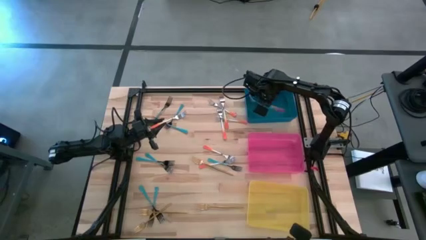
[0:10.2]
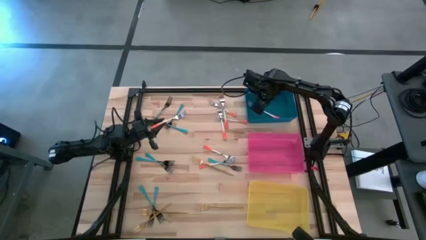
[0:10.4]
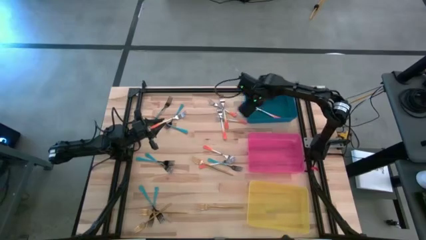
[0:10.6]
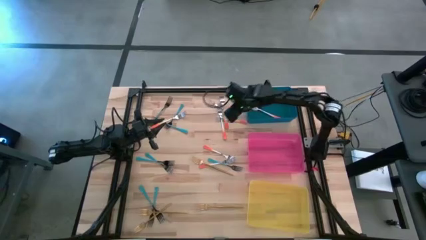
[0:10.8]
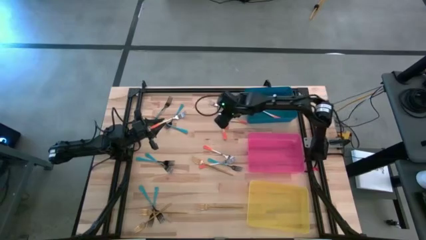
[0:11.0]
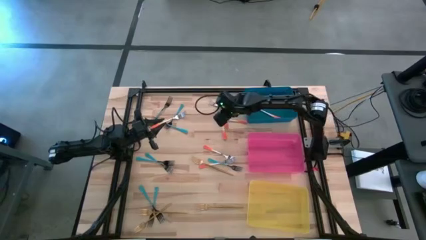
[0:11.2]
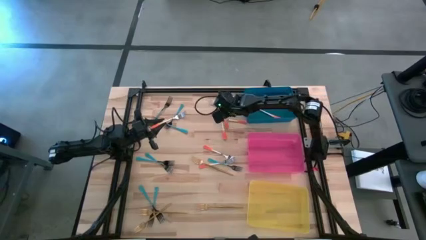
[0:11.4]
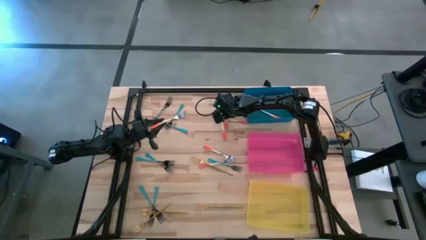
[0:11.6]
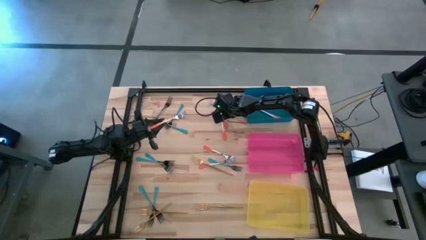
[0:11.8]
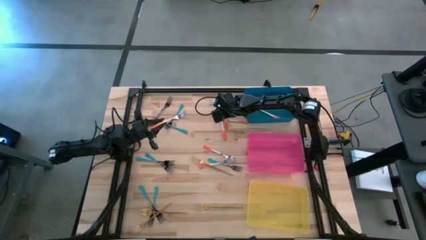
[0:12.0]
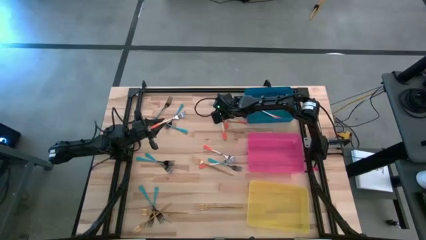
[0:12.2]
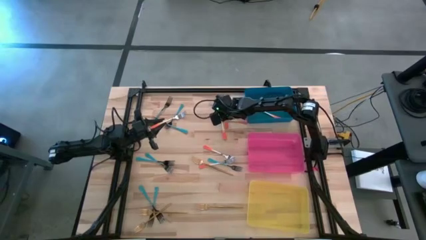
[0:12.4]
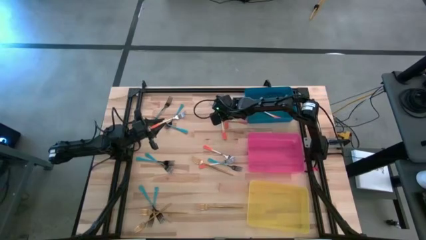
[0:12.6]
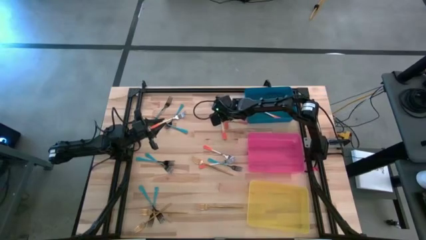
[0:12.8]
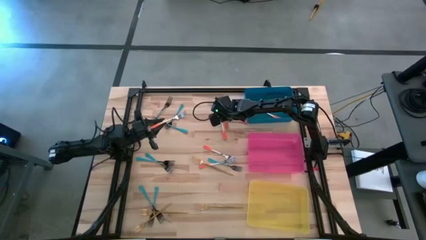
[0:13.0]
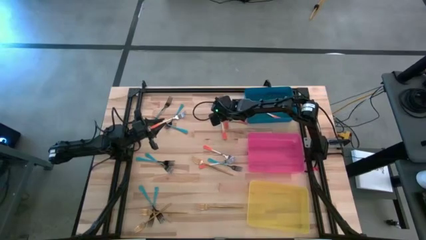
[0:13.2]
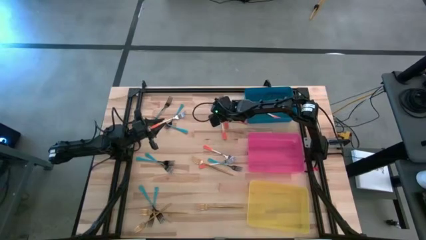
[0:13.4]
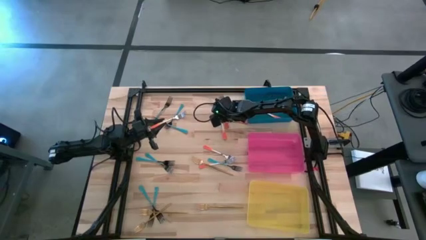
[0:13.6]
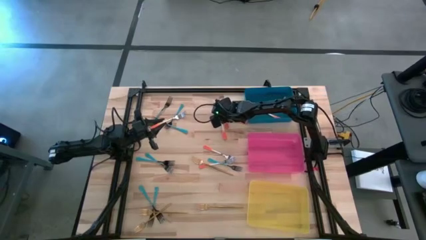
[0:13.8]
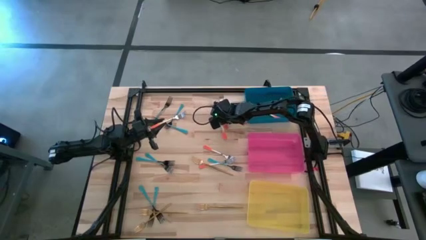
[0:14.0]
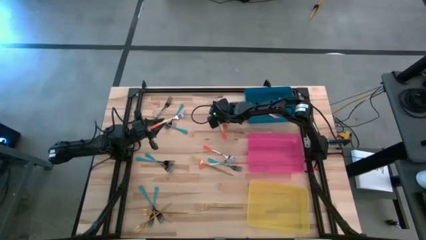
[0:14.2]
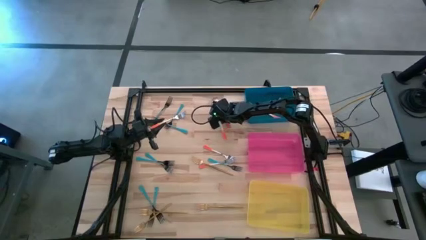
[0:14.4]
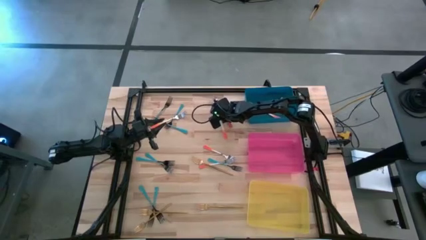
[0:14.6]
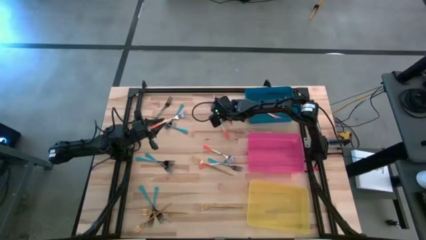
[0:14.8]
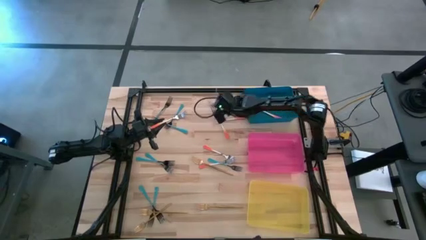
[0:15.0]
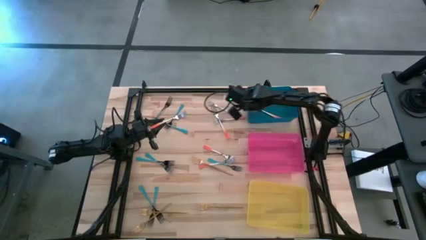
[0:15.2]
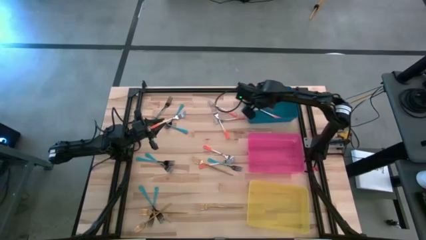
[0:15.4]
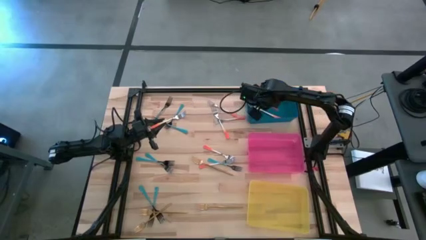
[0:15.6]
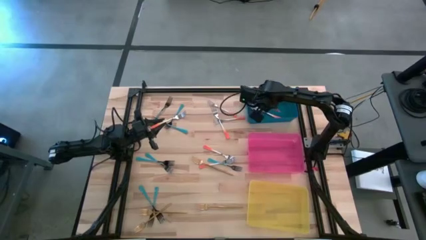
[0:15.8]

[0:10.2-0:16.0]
Task: Sort silverware by color (type)
Put the orange fork into the blue bin

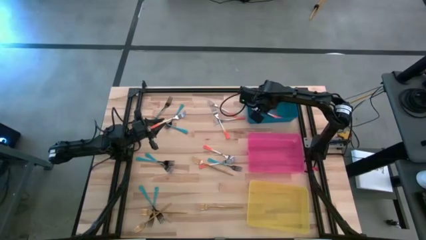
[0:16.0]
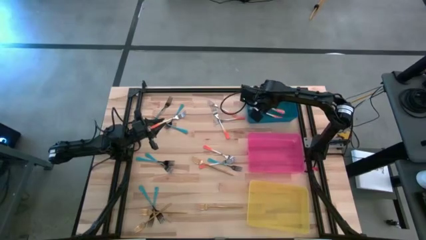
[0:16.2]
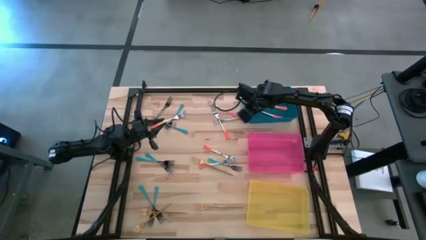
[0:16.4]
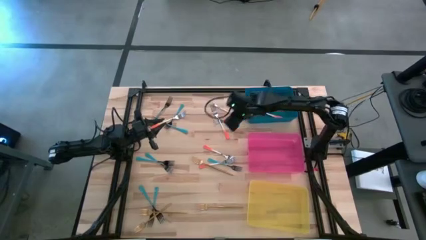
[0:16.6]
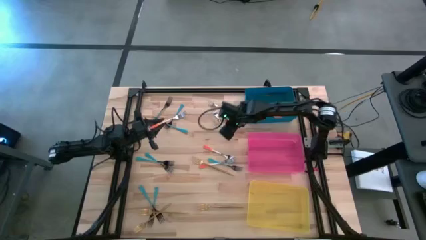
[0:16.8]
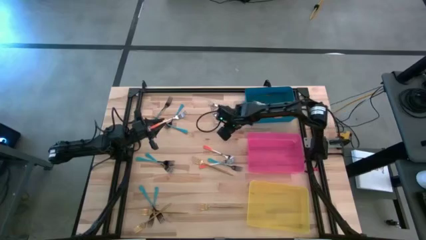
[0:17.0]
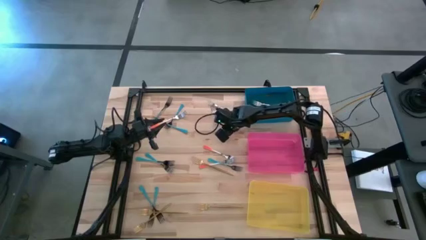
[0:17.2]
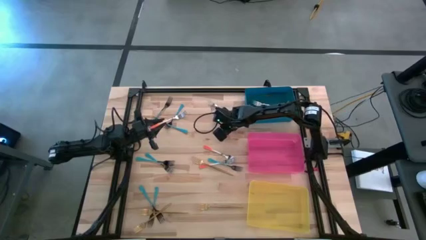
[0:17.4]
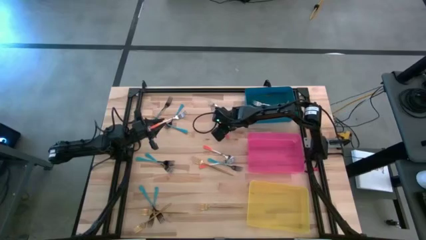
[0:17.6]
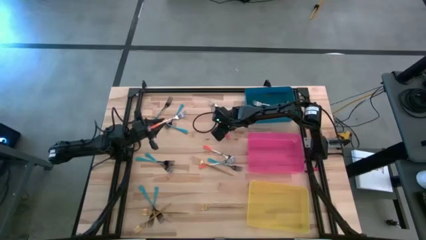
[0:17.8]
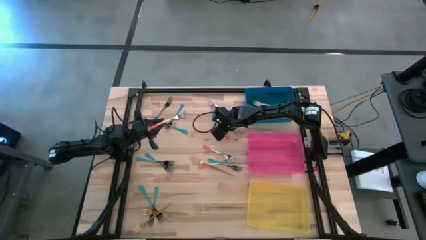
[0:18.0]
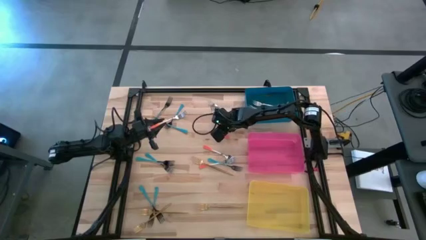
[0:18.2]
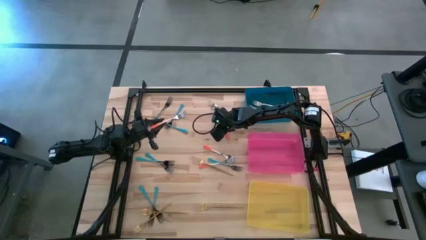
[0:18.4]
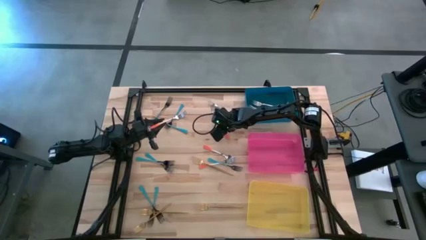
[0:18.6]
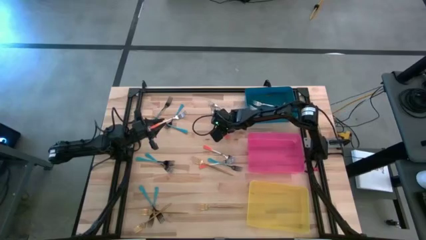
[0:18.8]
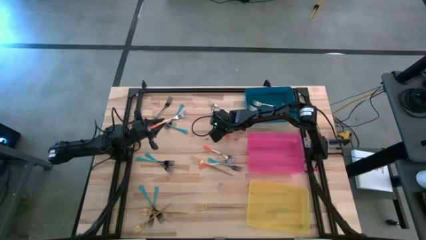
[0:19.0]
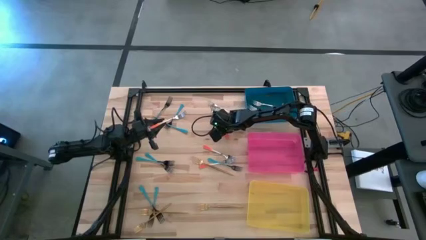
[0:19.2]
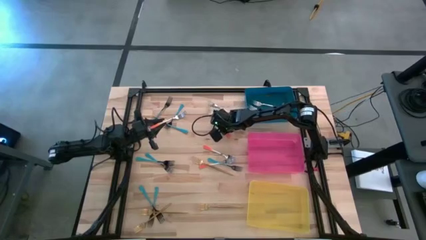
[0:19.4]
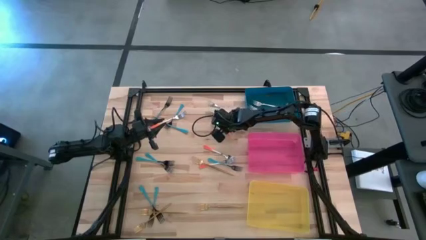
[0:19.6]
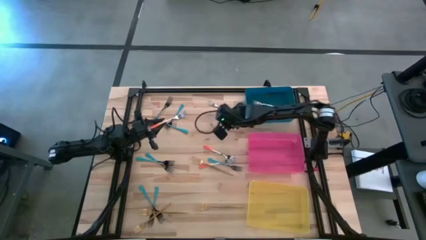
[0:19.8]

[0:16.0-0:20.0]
Put the orange fork into the blue bin

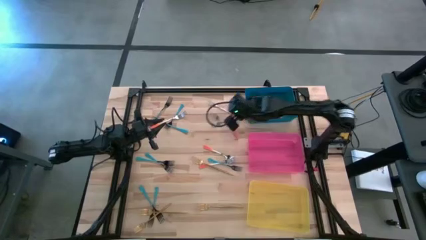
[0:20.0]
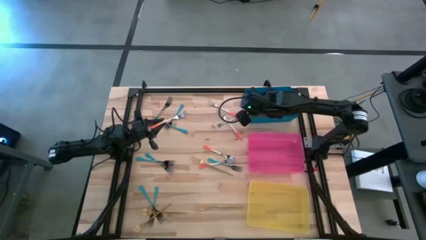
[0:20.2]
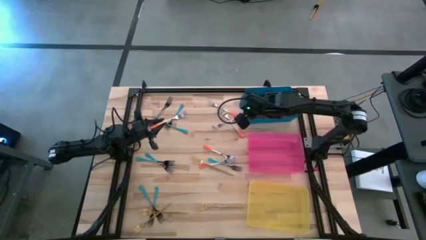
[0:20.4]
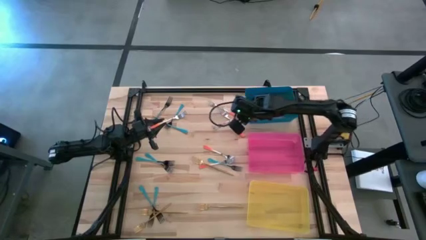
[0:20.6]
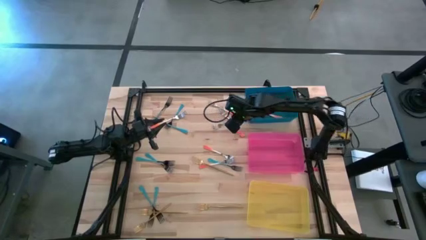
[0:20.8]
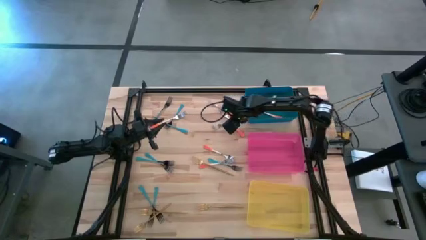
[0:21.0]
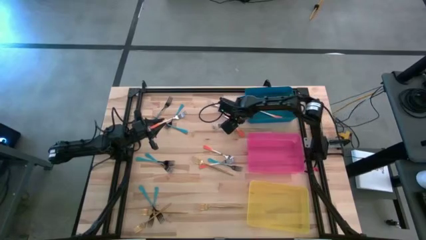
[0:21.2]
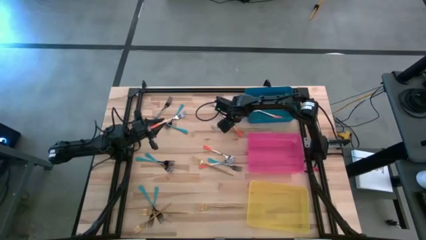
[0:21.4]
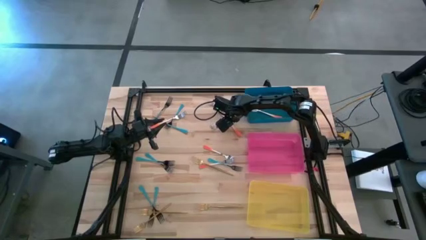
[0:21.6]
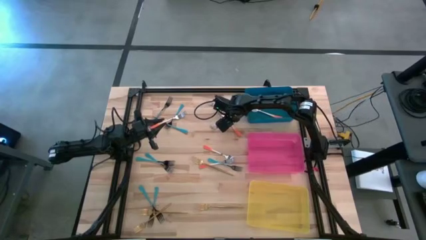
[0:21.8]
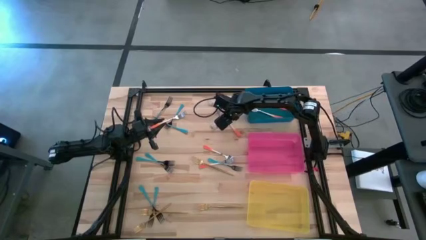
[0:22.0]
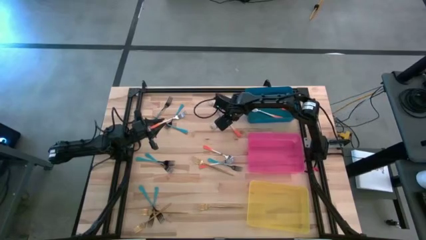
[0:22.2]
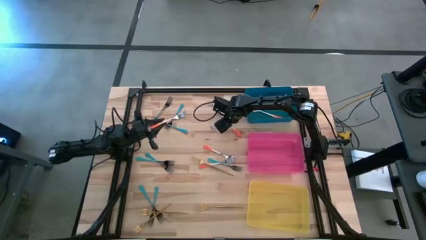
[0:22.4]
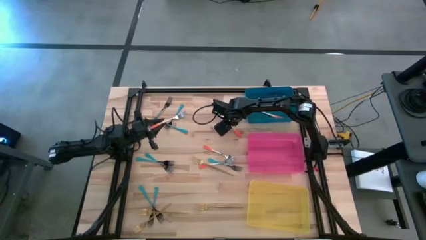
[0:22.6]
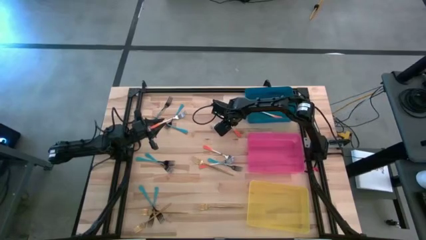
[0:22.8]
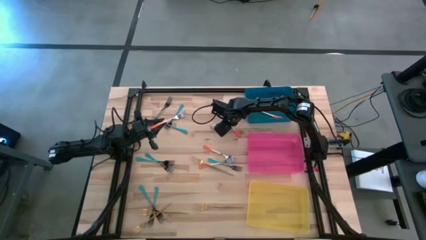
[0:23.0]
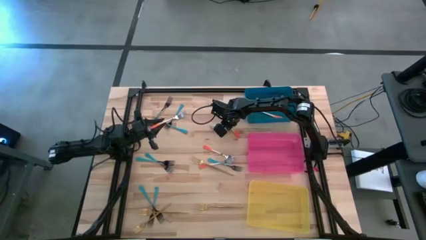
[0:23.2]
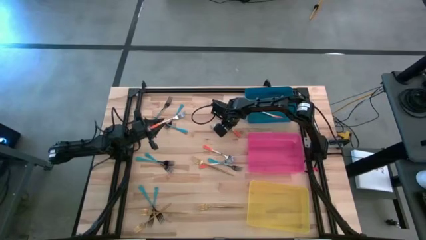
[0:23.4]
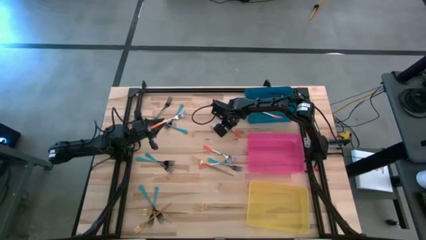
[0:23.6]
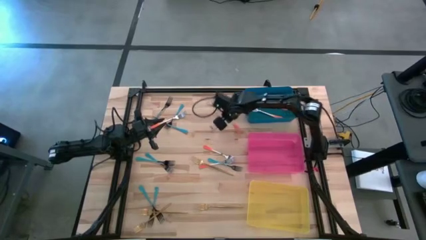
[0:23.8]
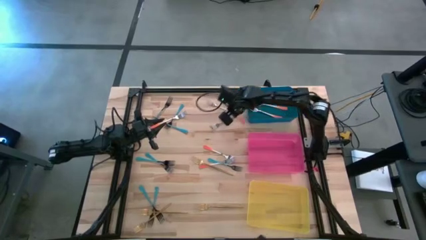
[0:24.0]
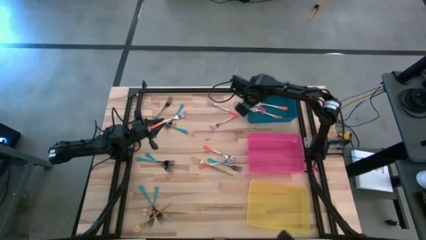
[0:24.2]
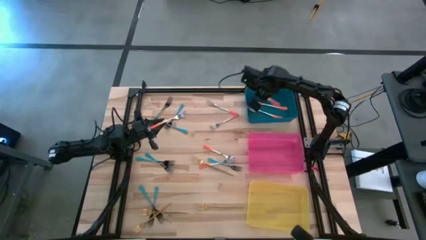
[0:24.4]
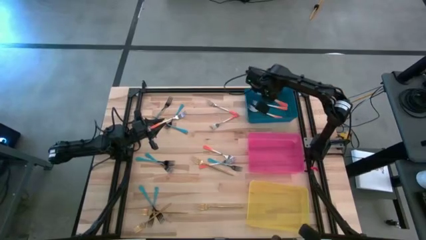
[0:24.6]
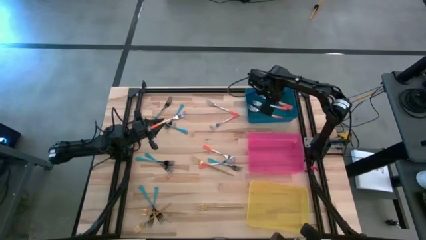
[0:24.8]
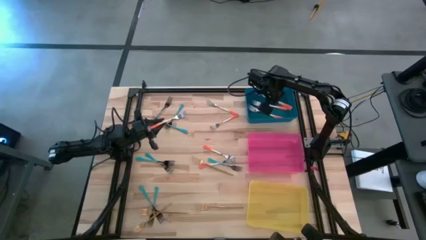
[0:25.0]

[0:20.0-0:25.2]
Put the orange fork into the blue bin

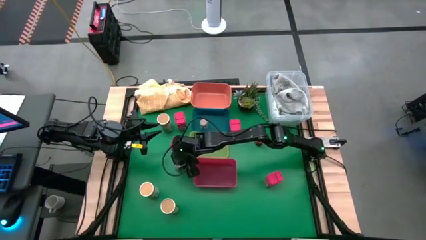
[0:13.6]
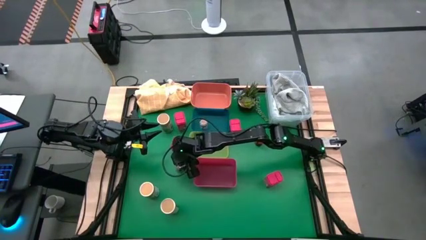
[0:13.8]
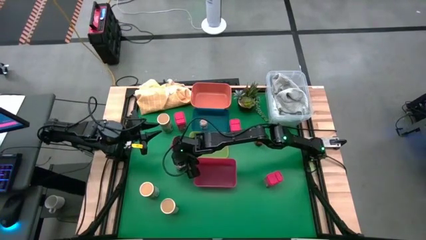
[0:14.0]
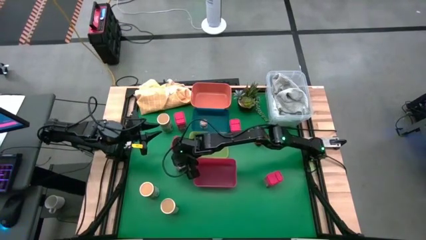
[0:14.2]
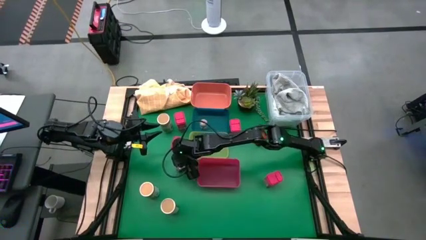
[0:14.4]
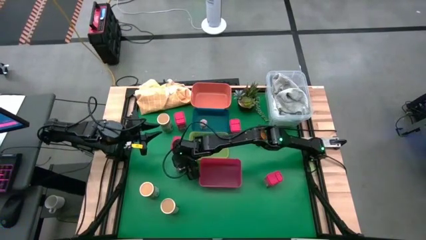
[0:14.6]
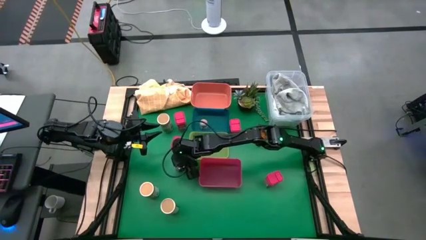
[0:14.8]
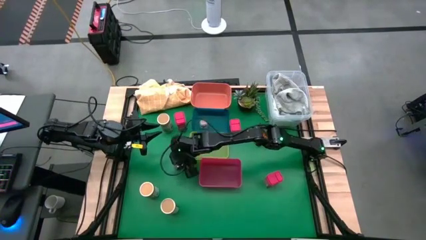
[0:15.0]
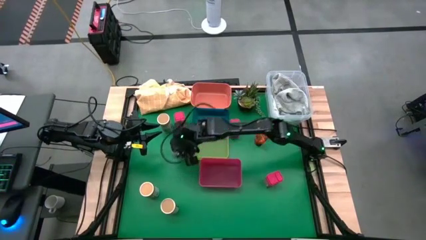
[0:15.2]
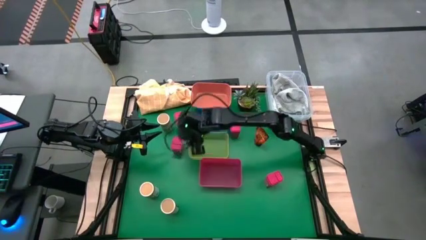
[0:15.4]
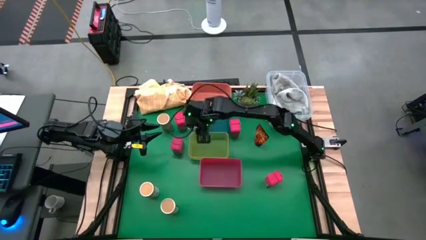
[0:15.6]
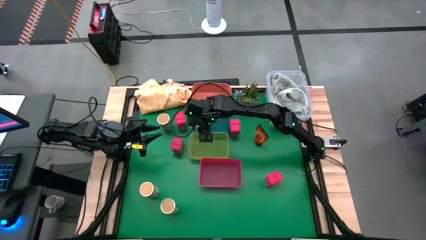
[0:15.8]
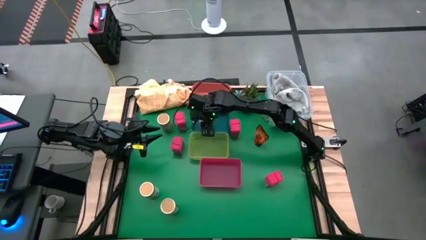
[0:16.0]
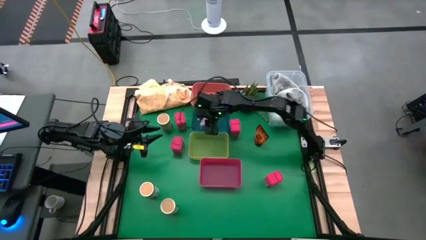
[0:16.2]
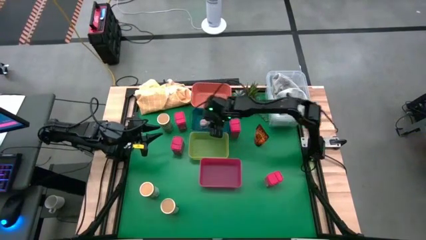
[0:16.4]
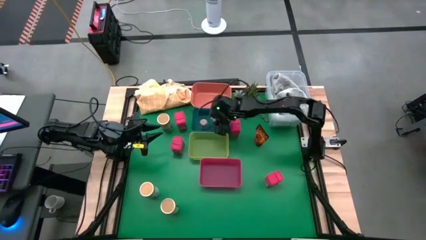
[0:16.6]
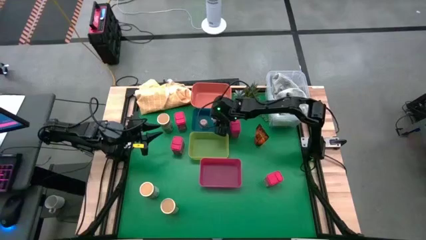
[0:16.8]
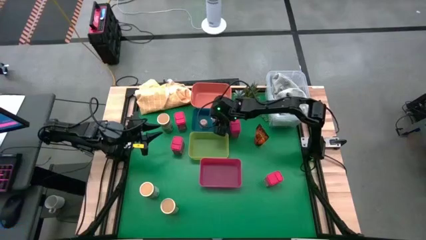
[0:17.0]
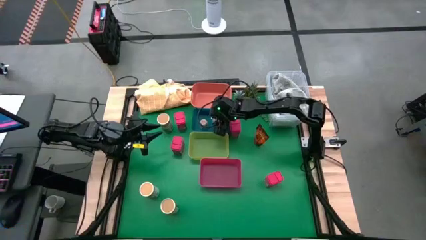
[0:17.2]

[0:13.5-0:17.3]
Task: Sort spices by type
Put the brown seasoning bottle into the blue bin
